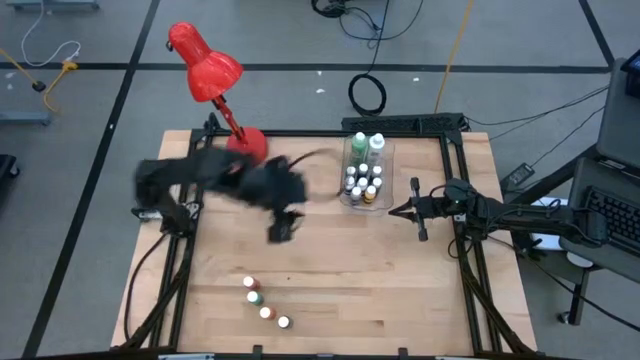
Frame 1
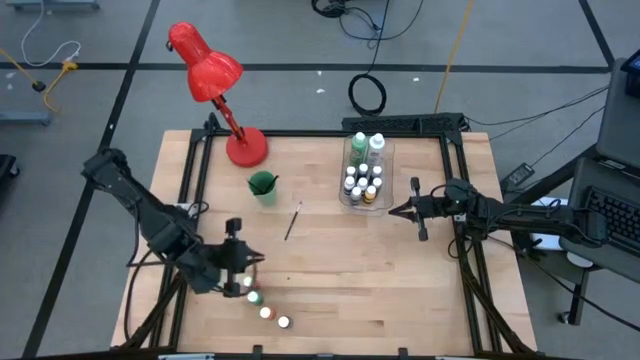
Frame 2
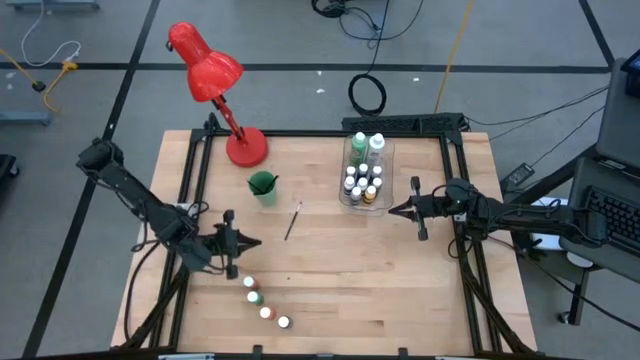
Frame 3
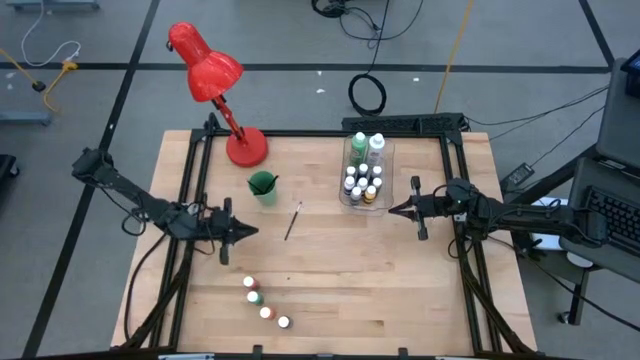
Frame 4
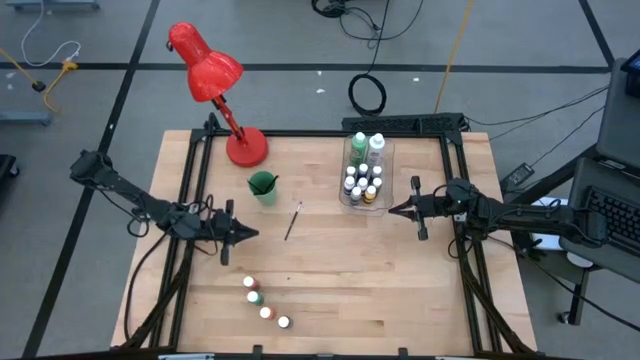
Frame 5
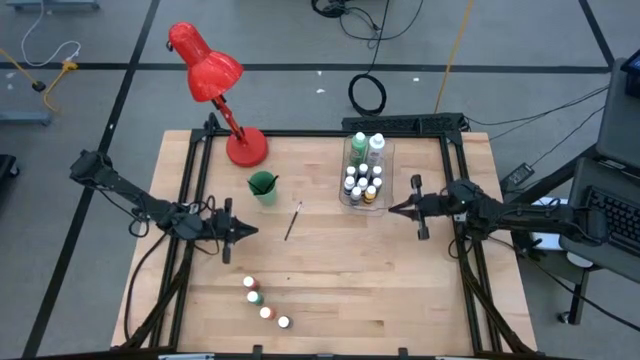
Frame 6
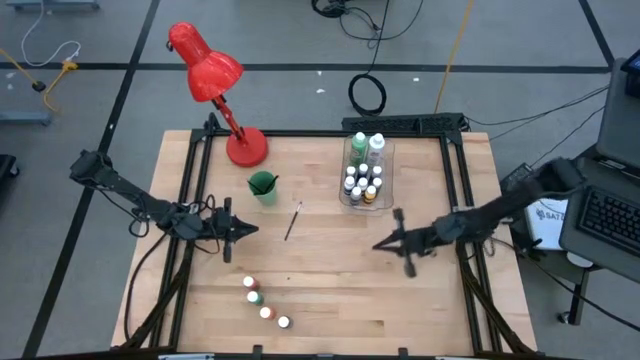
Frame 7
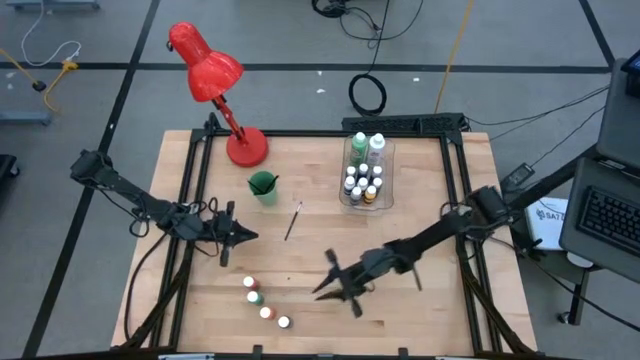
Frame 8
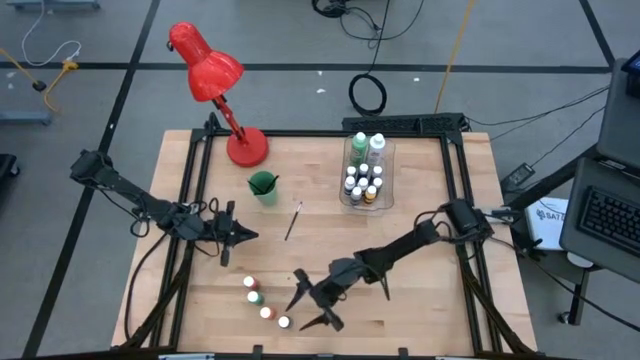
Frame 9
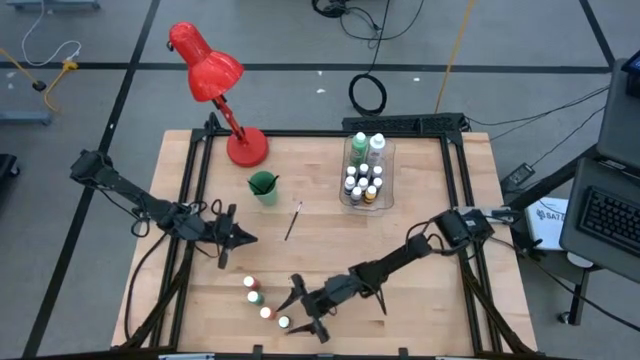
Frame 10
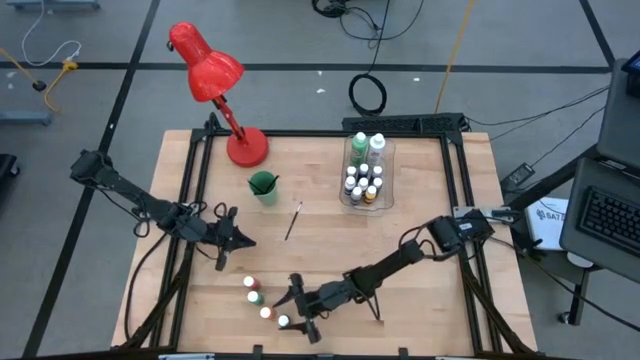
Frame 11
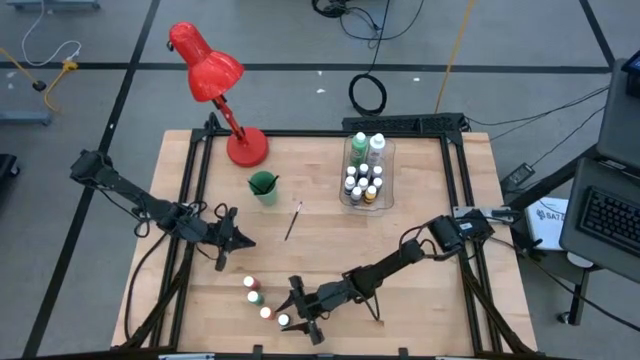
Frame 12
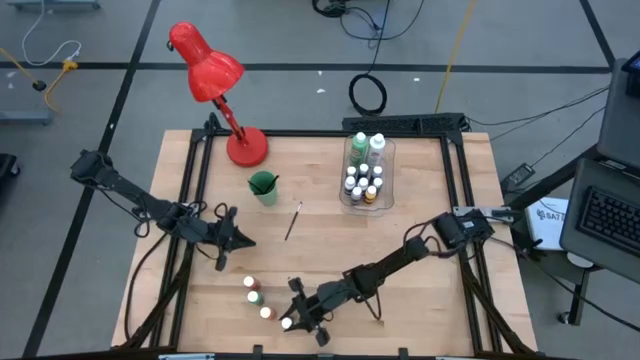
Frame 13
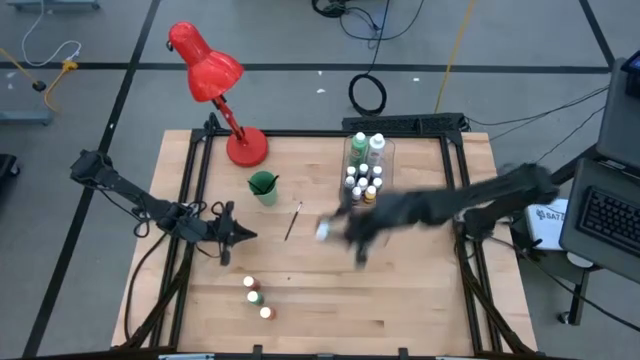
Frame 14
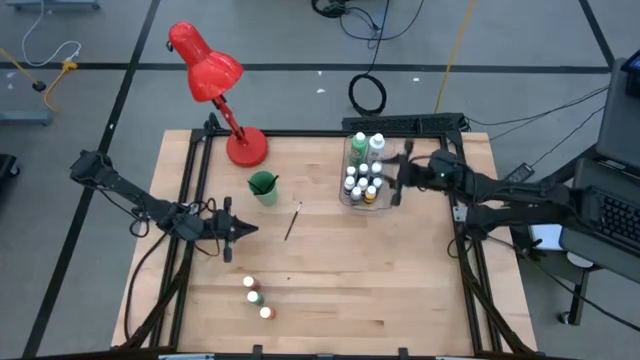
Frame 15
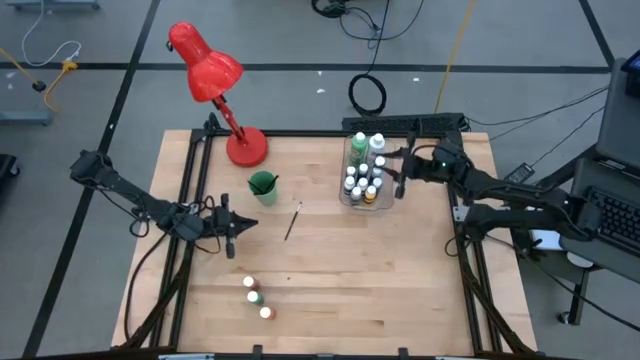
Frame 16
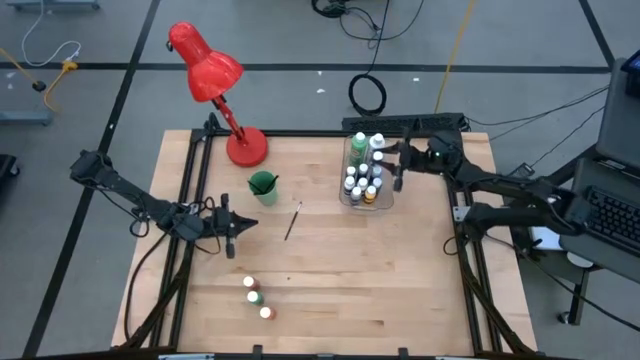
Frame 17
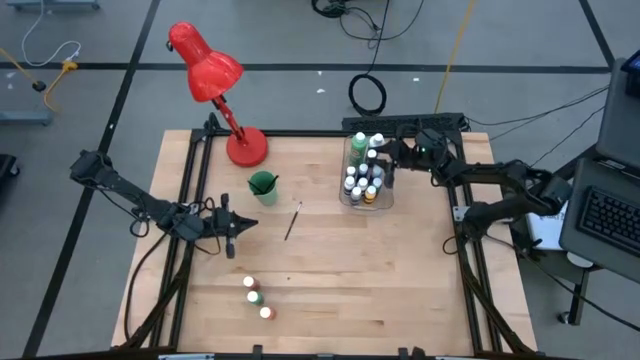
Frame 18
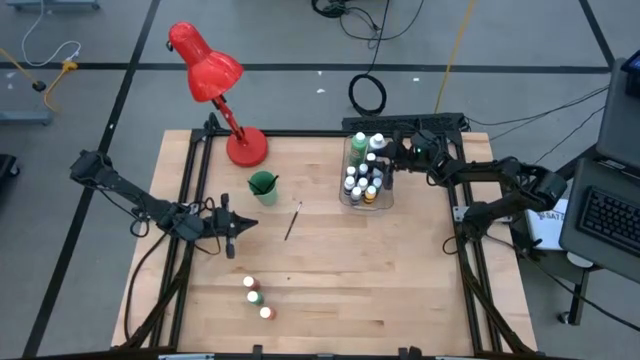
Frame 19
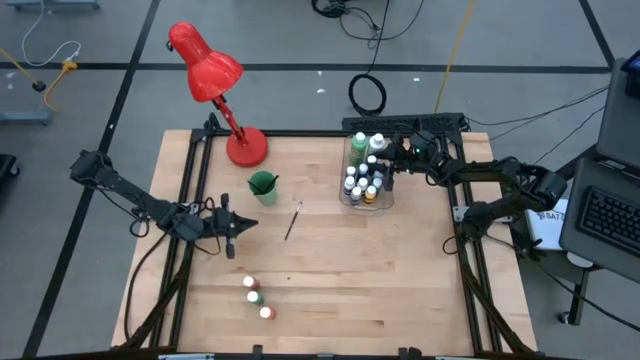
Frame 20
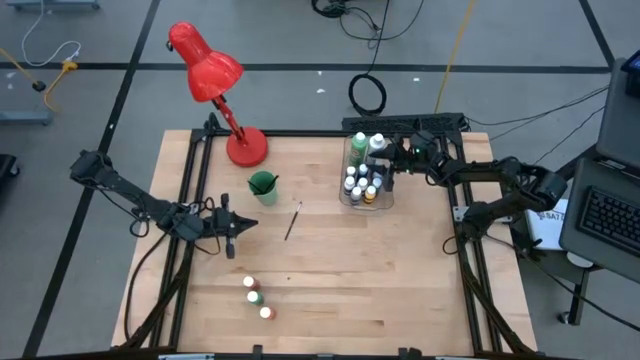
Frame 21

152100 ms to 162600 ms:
Task: Pick & Place Paint Supplies
Put the small black paint bottle into the transparent bin

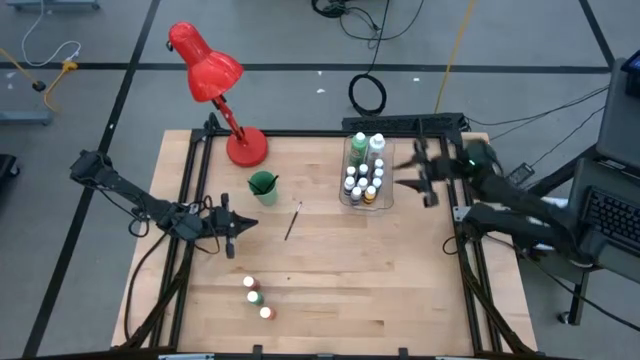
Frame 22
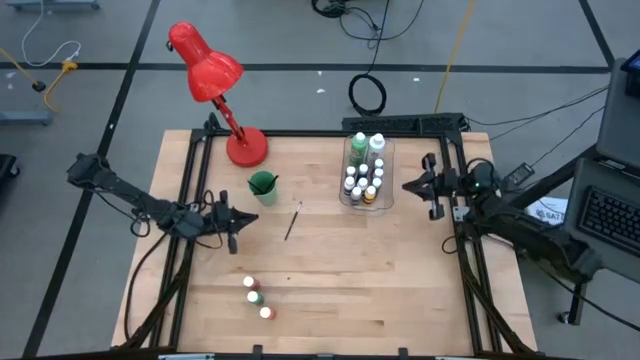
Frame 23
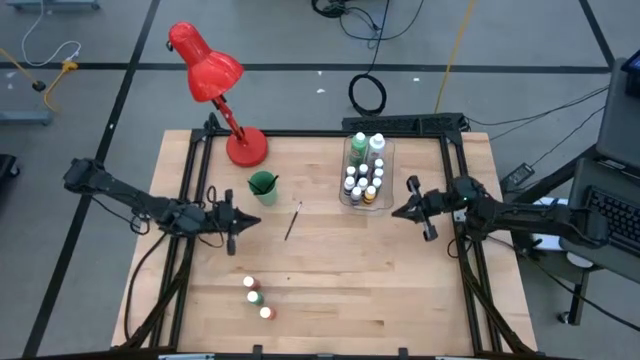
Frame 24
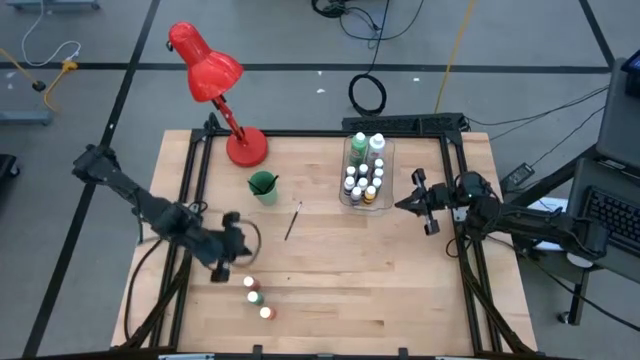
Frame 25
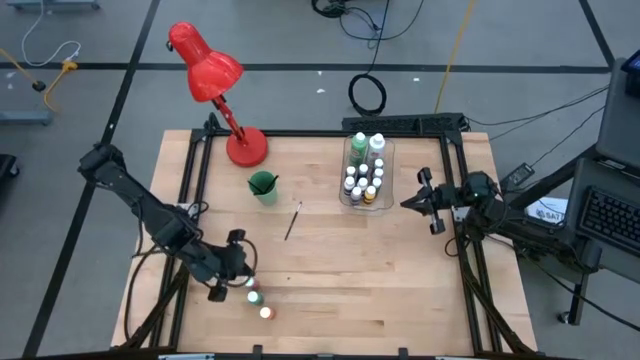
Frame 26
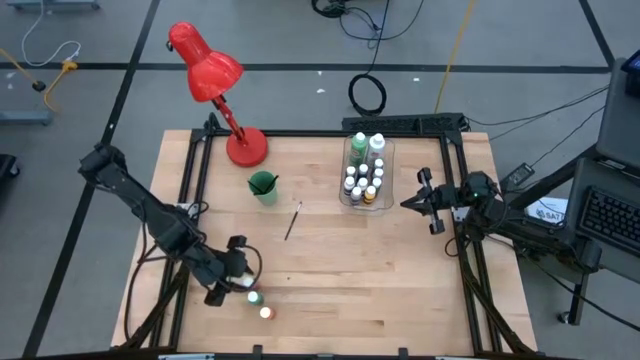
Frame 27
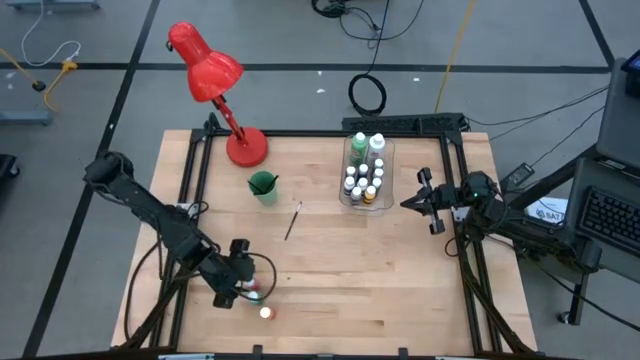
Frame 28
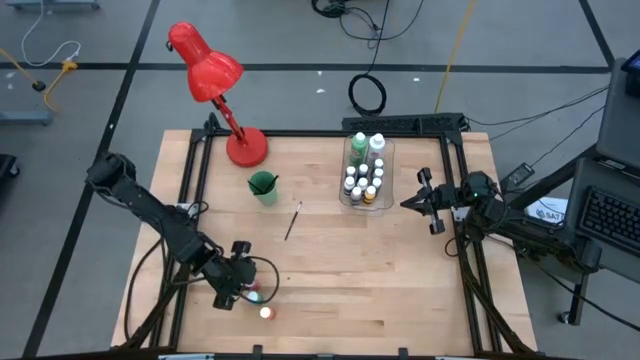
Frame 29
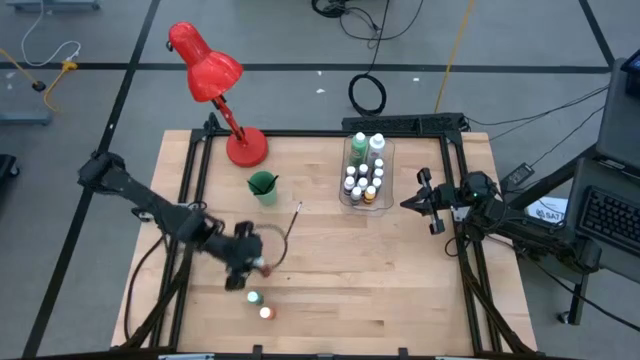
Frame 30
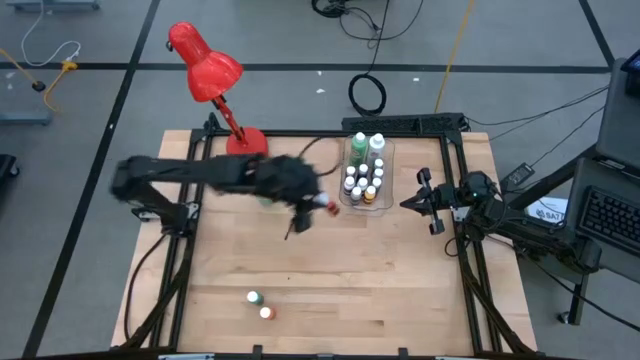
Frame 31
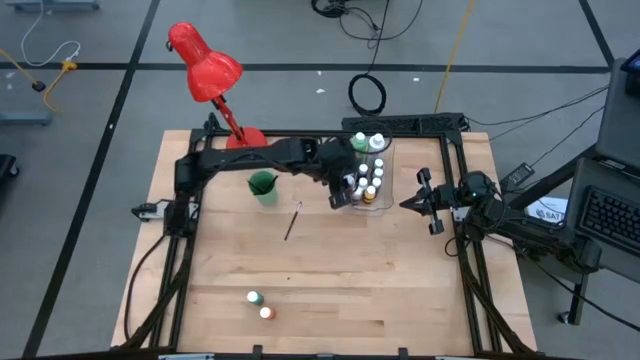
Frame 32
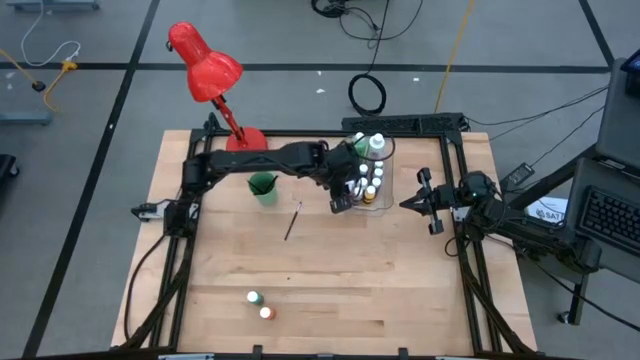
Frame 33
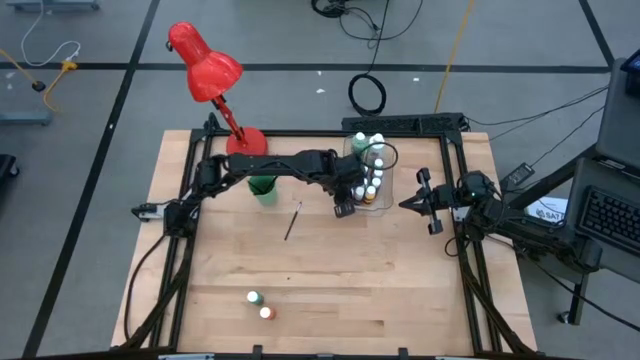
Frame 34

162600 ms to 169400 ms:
Put the small red paint bottle into the transparent bin

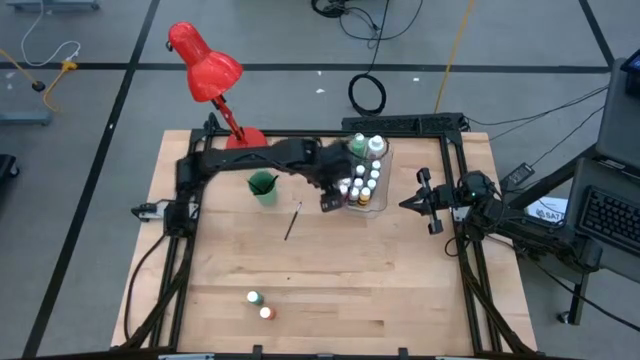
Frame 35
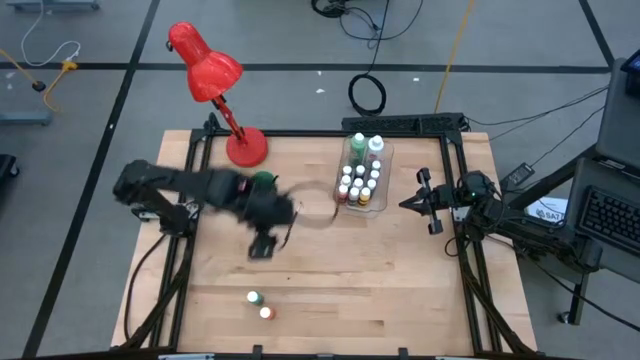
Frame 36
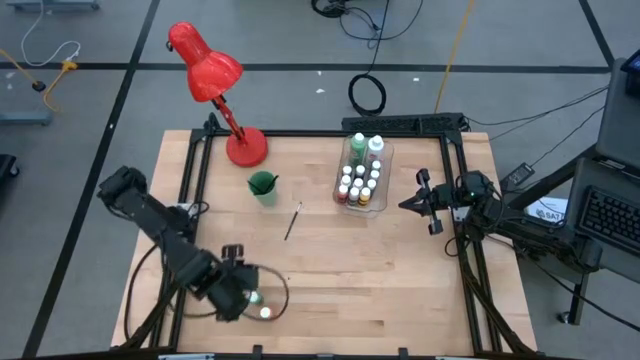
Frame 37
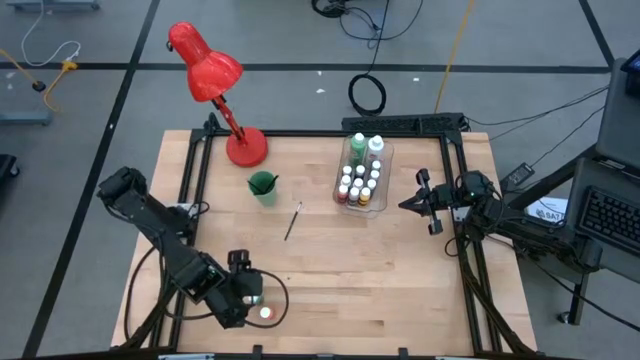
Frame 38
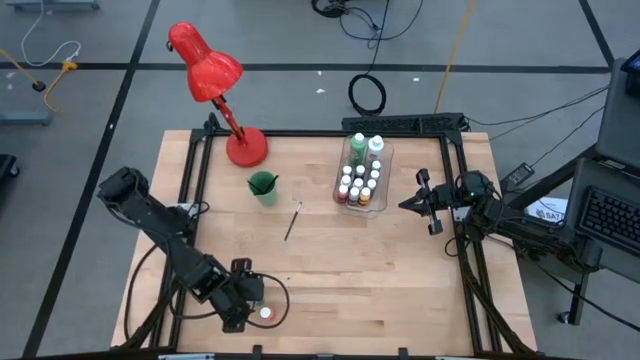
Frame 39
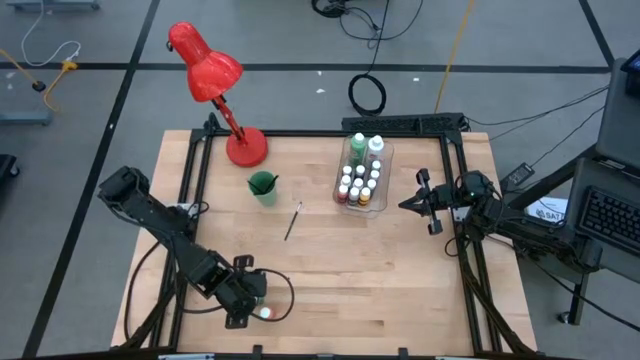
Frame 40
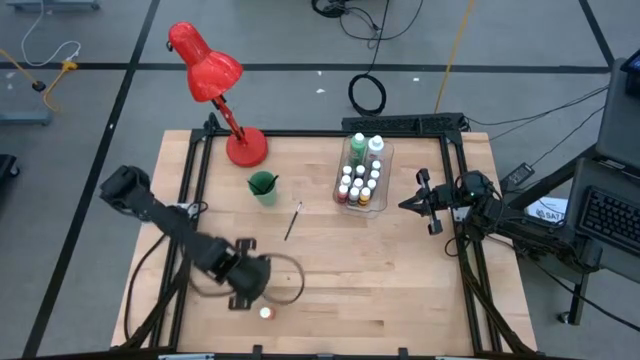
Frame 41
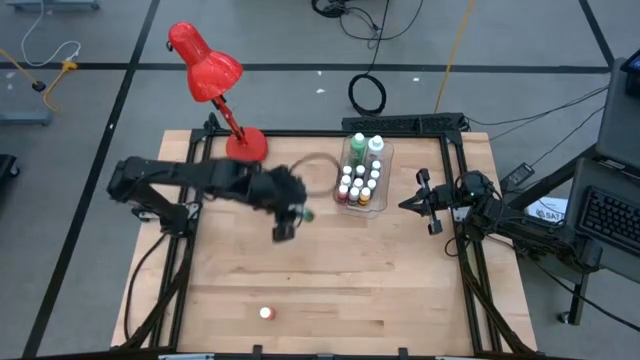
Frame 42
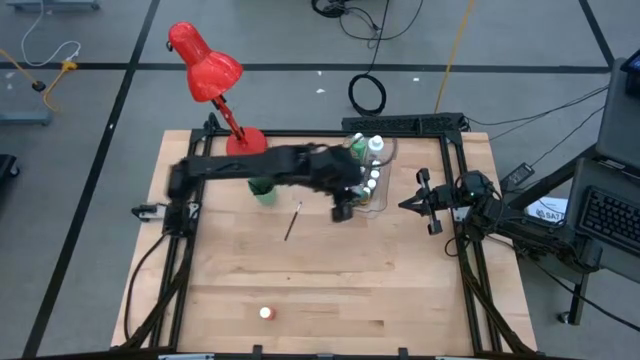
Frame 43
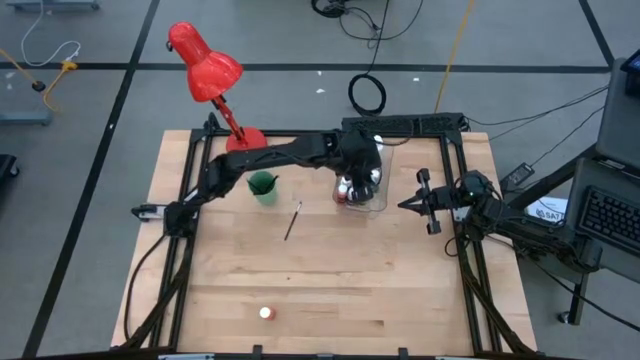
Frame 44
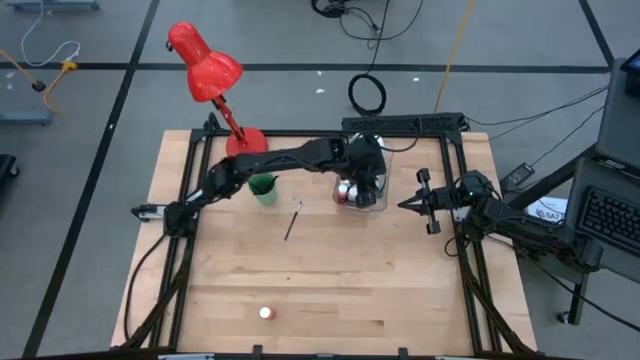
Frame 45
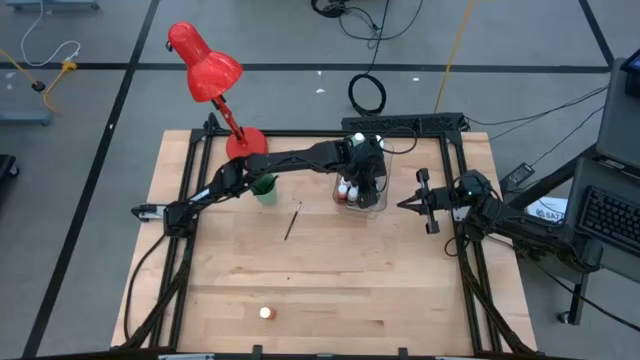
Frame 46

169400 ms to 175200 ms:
Put the small green paint bottle into the transparent bin
